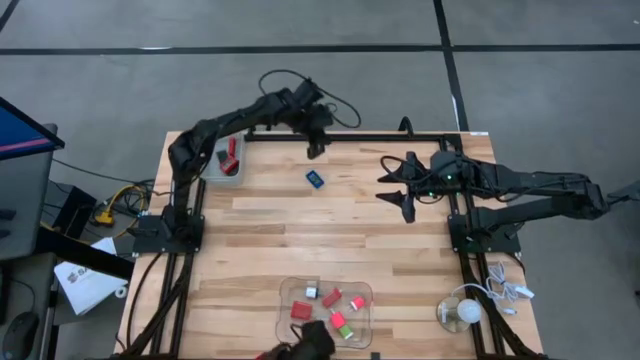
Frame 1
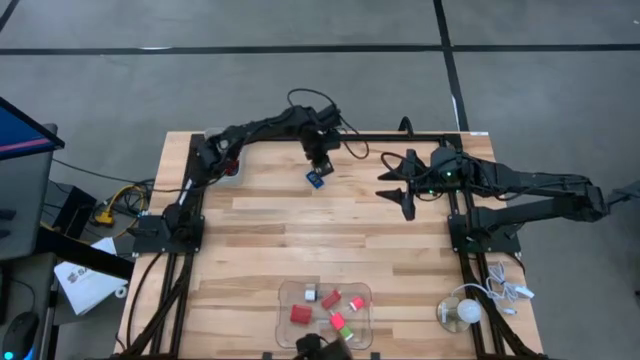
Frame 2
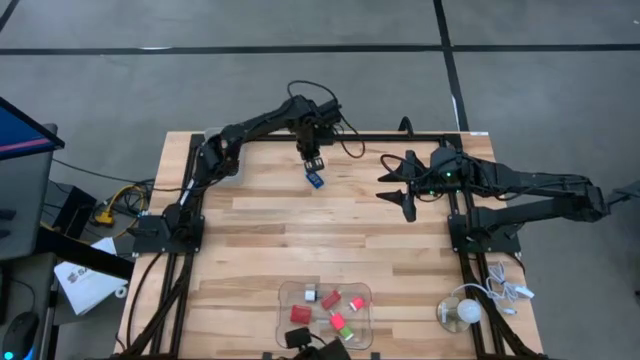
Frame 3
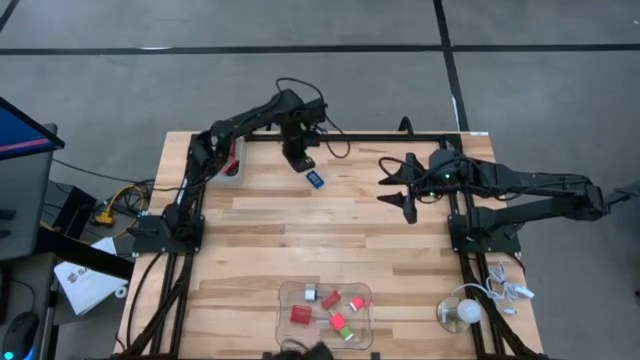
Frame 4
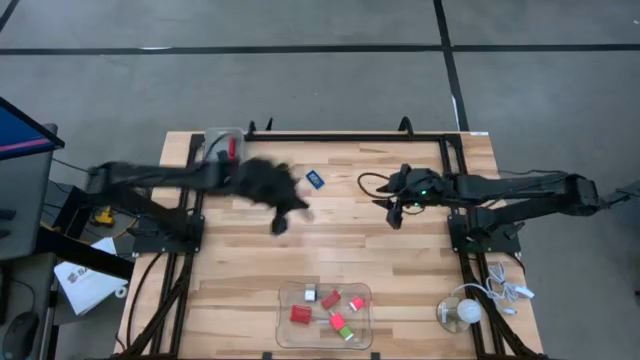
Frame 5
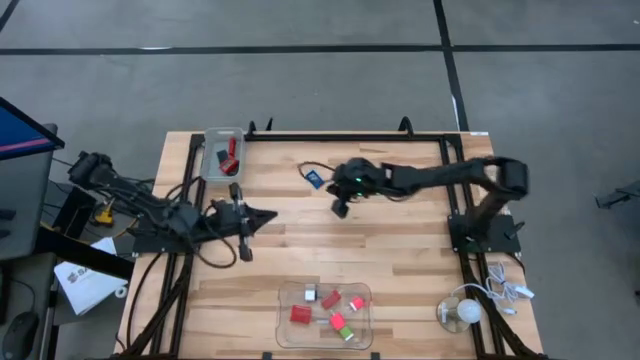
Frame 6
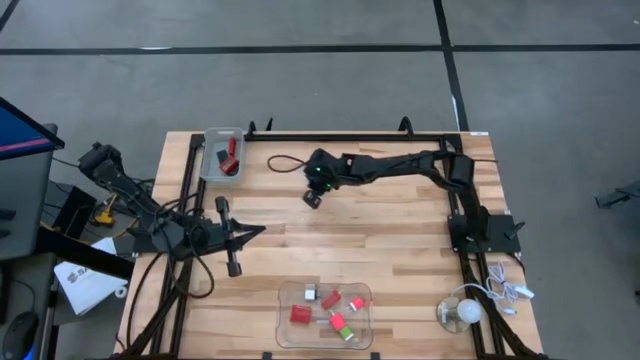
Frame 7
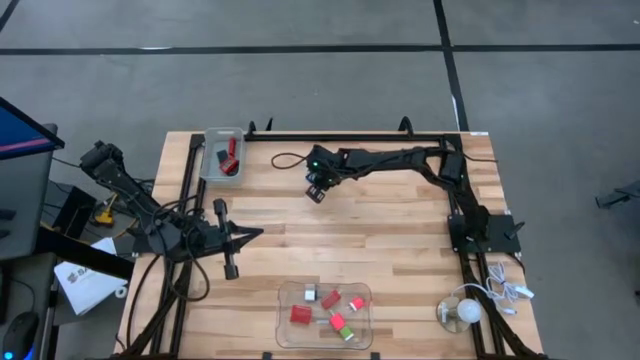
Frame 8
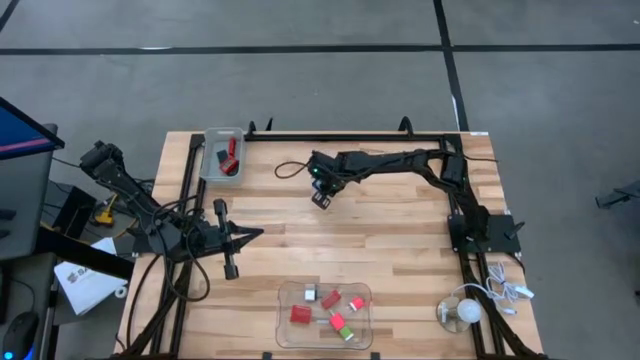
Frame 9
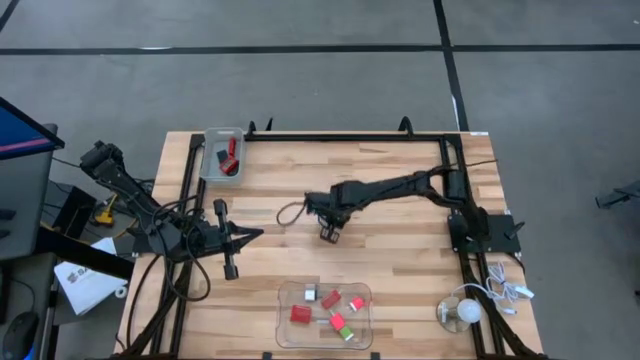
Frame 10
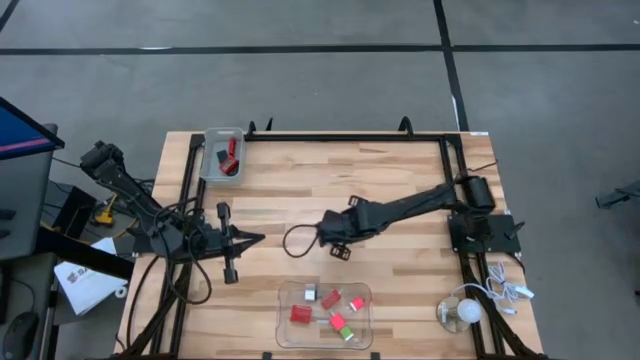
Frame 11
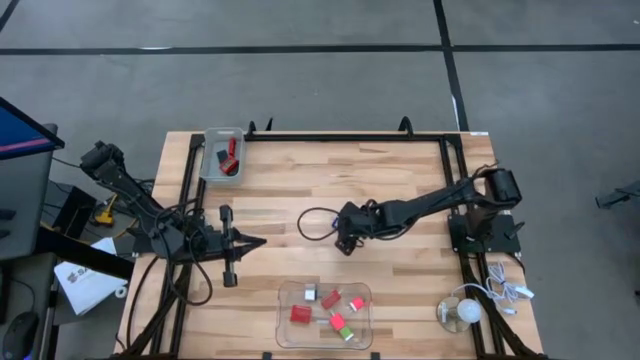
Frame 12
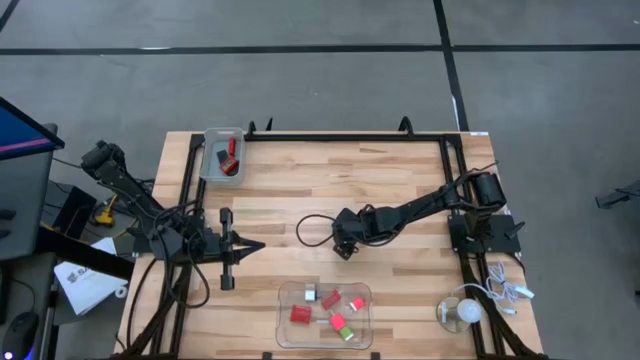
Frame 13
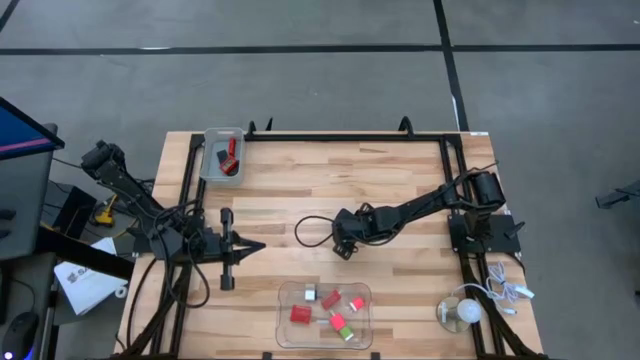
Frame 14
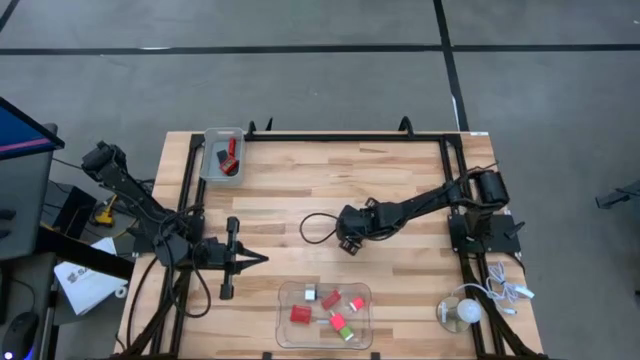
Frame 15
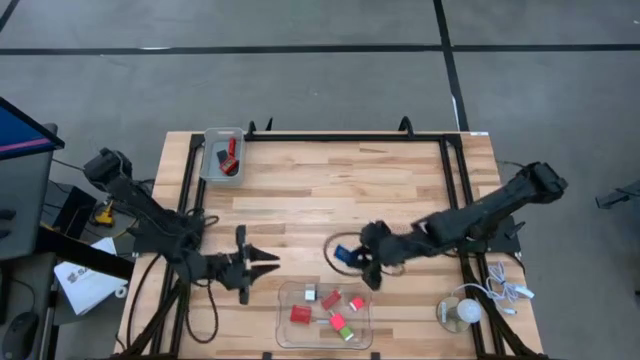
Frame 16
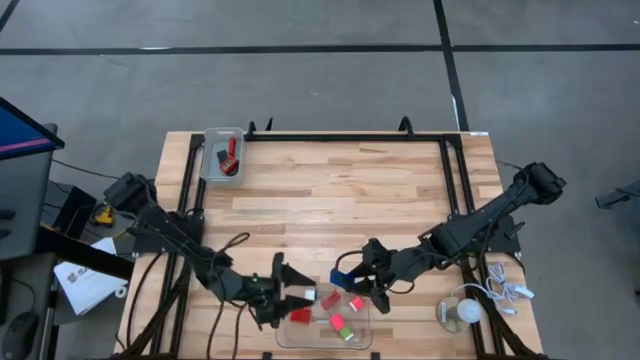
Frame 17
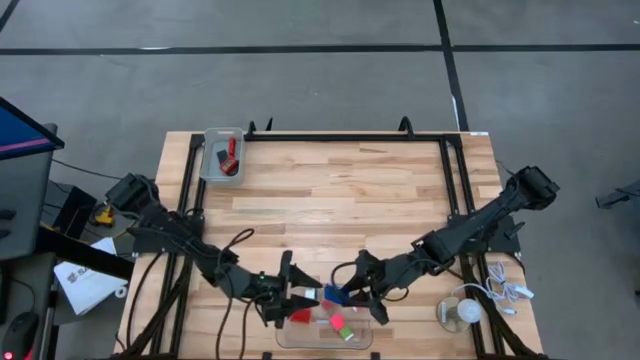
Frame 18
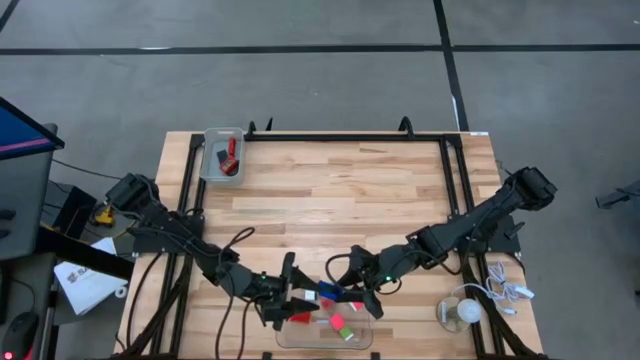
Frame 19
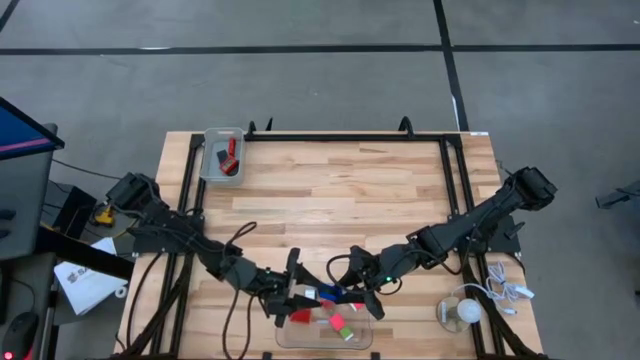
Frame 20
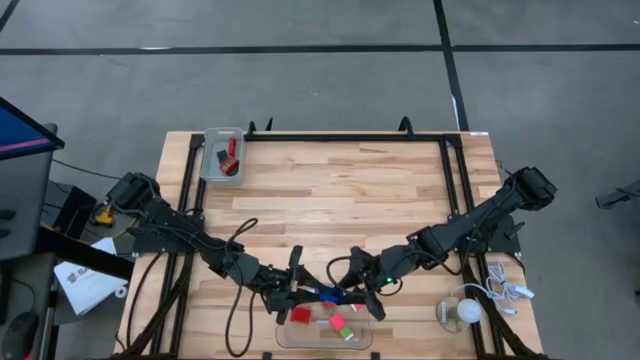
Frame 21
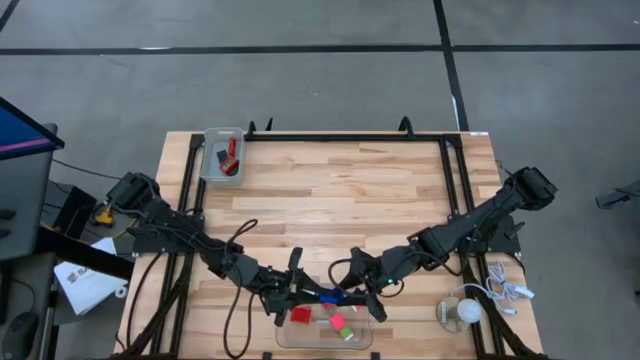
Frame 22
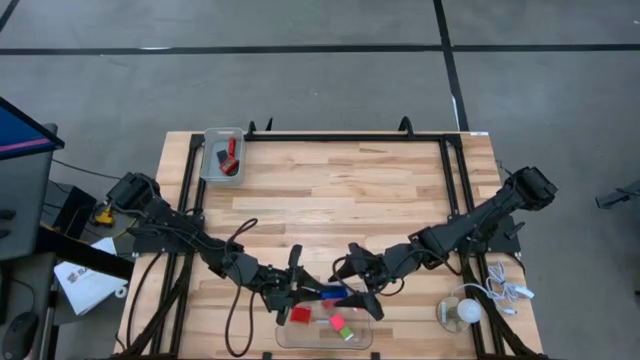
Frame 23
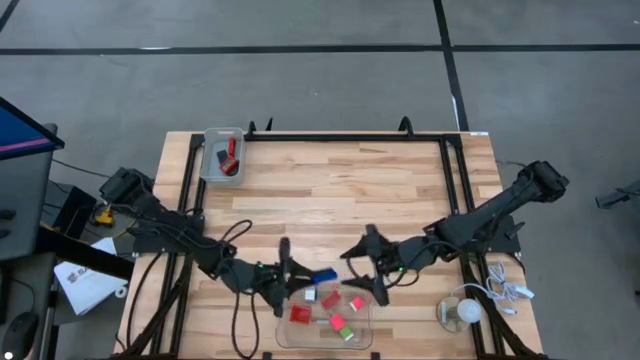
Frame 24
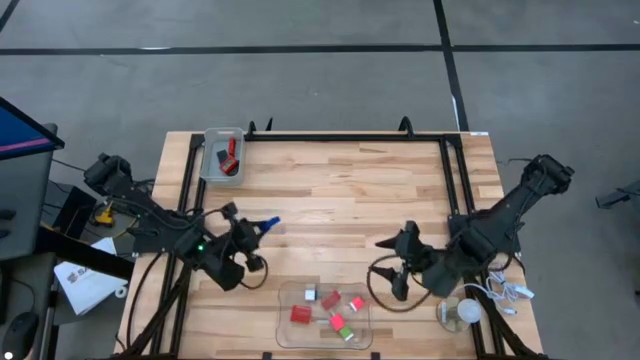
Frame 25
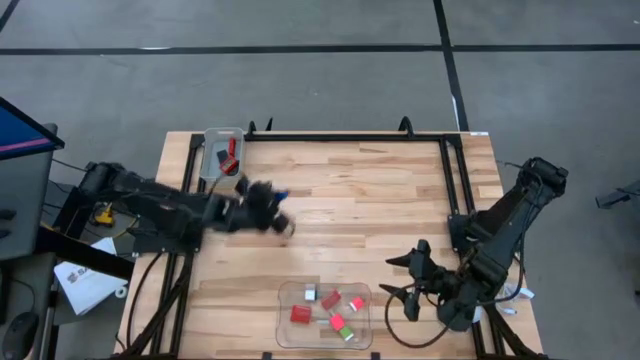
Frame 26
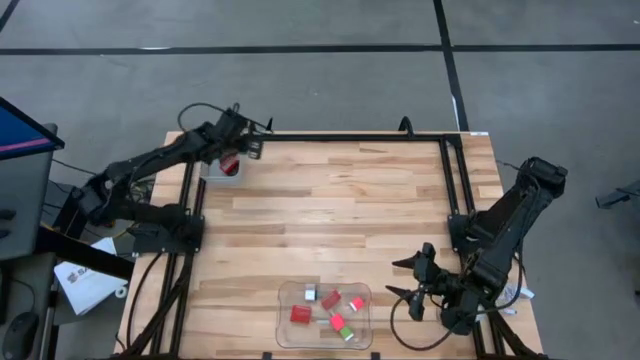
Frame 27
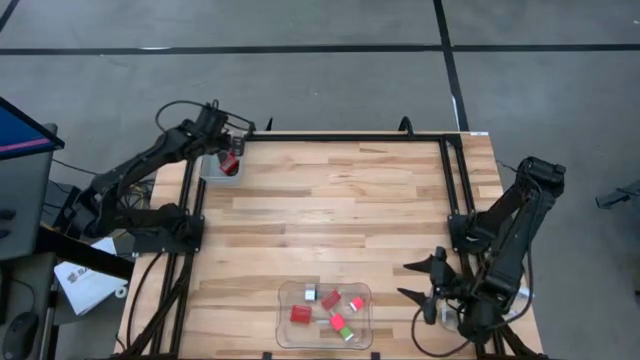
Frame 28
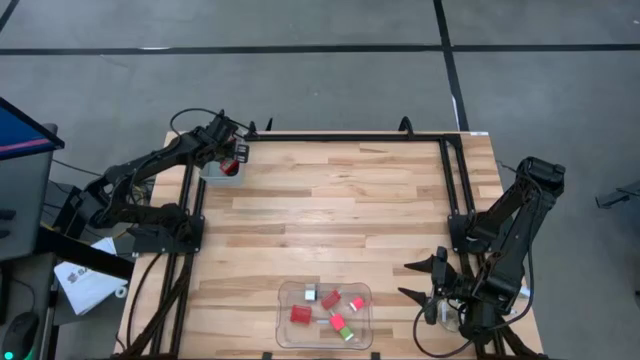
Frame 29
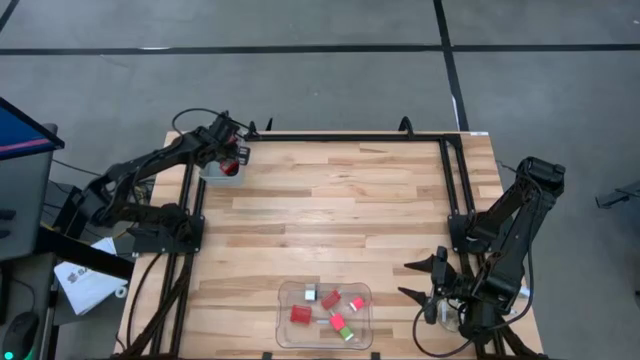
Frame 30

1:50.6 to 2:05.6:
Task: Pick & Place Office items
Put the blue digital clock into the gray bin

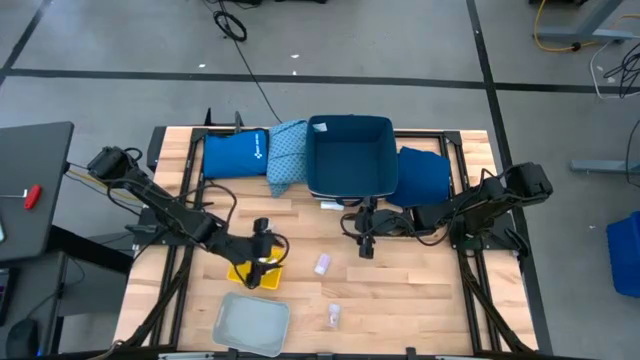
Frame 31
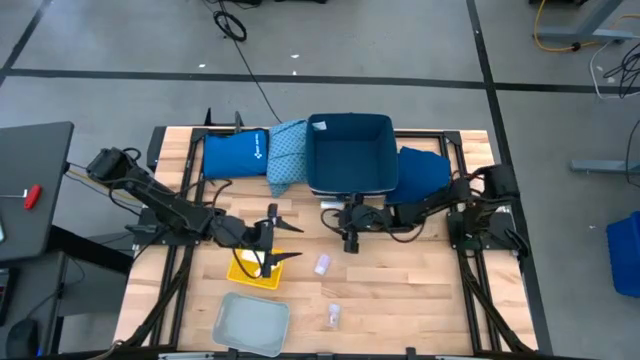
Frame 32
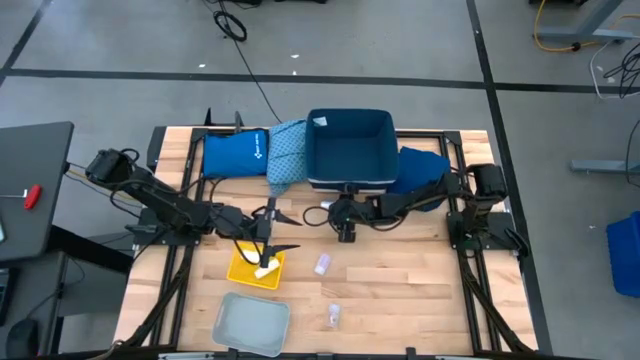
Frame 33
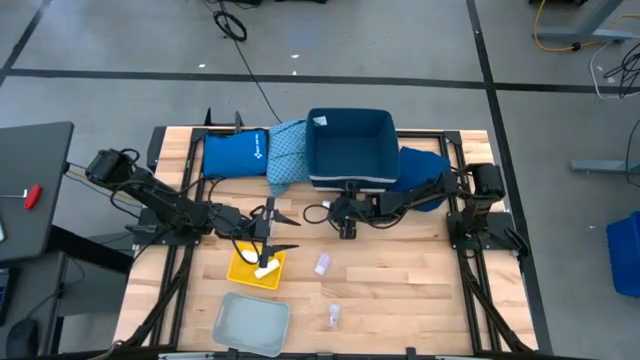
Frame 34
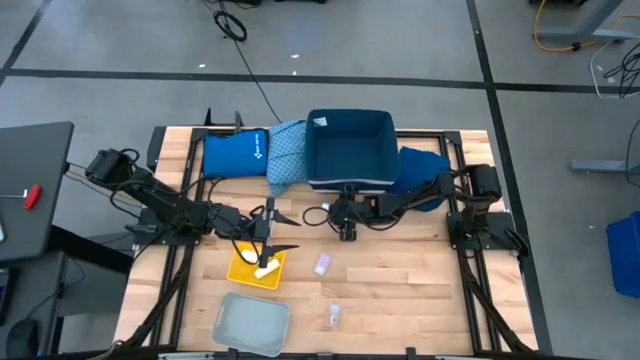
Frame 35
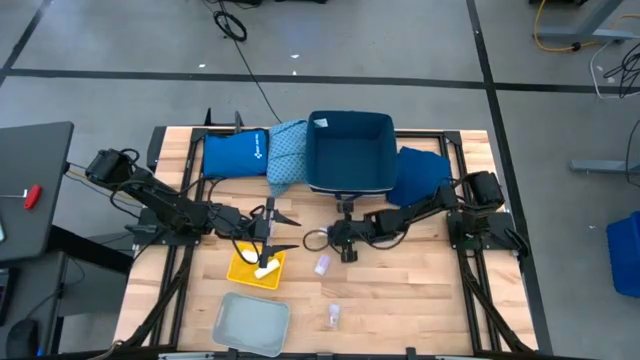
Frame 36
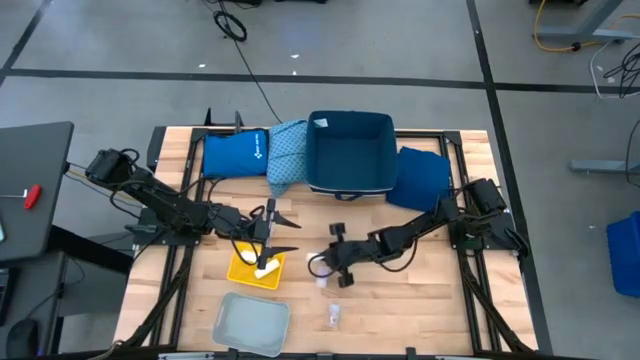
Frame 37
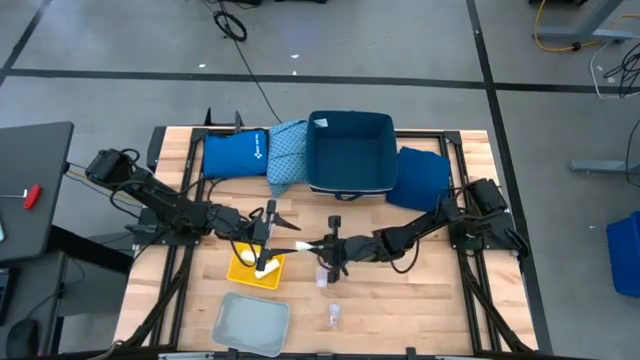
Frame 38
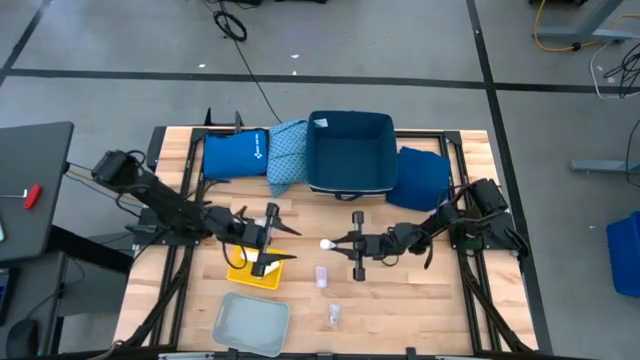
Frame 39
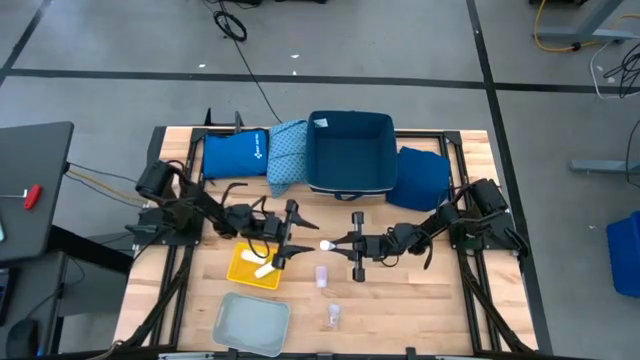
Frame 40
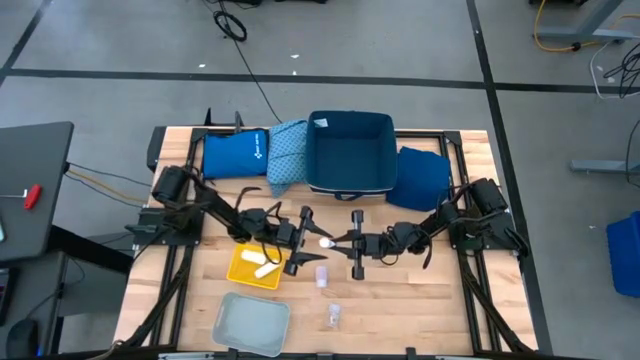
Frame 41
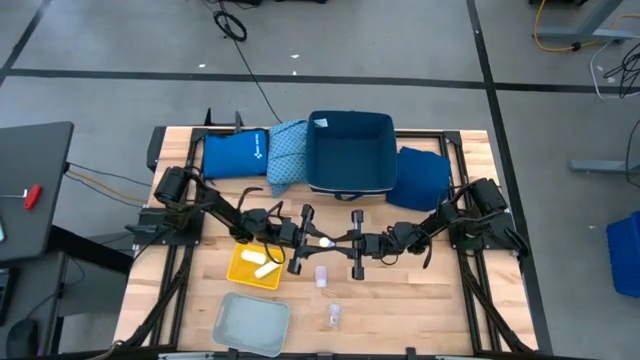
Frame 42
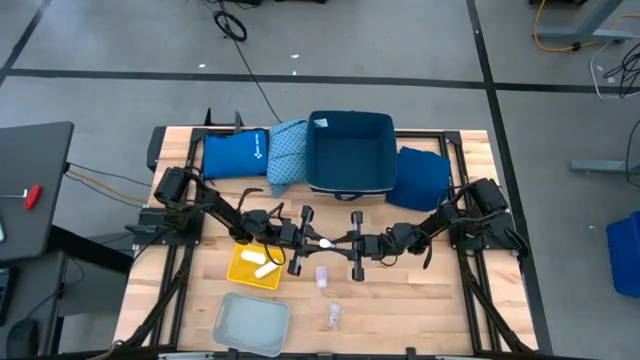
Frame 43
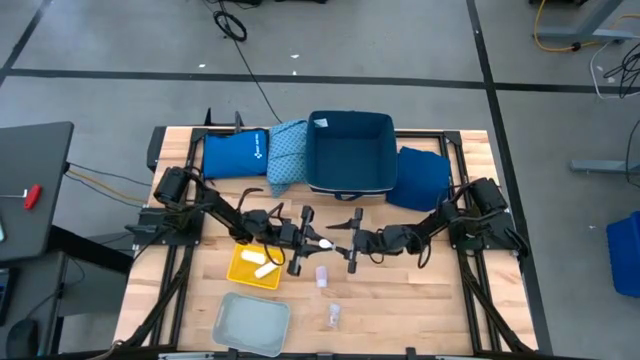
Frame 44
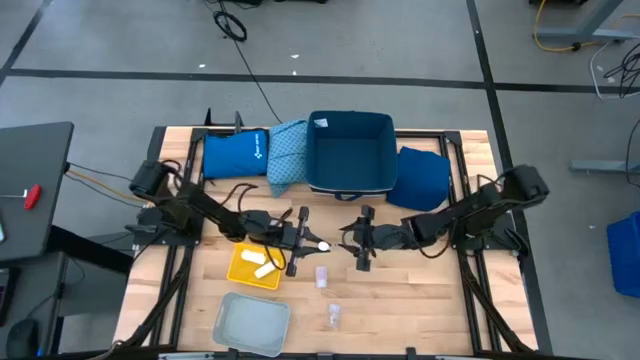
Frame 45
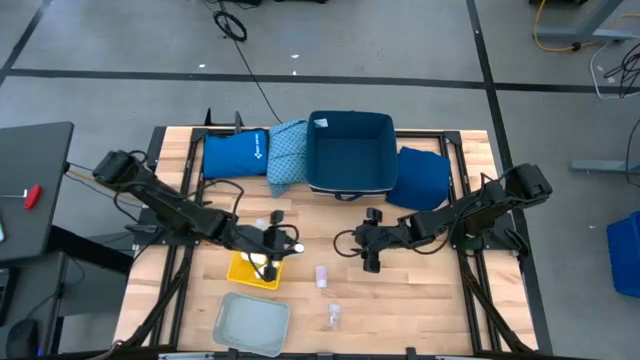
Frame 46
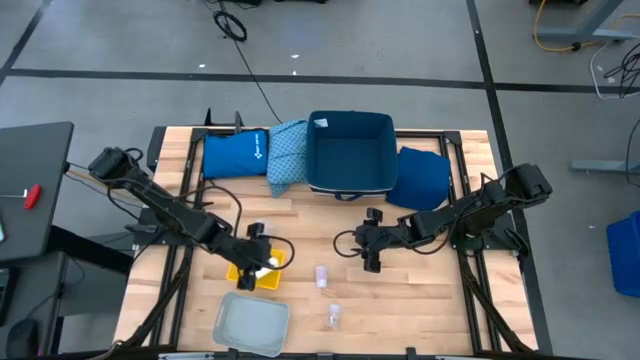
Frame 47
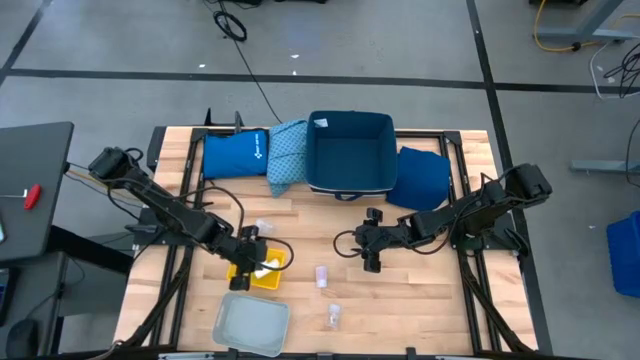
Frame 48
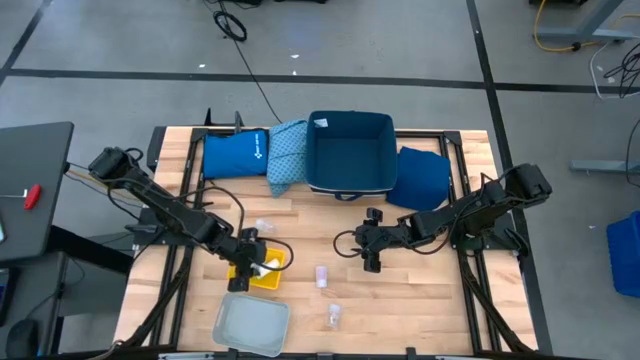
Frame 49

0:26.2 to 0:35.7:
Task: Pick & place medical supplies in basket/bin
Put the white rolled gauze into the yellow bin
